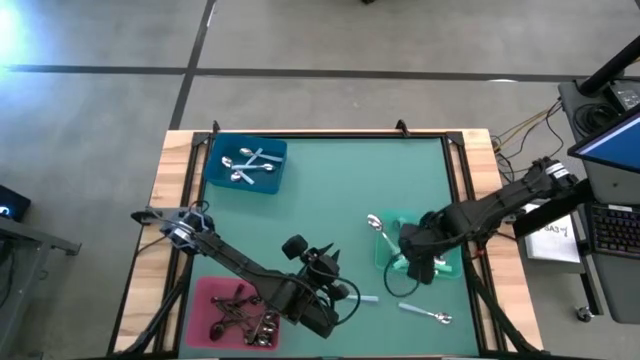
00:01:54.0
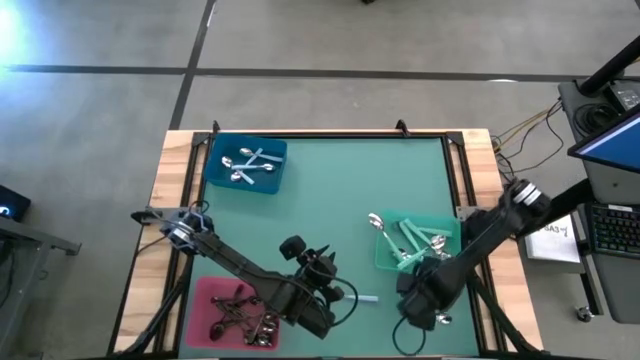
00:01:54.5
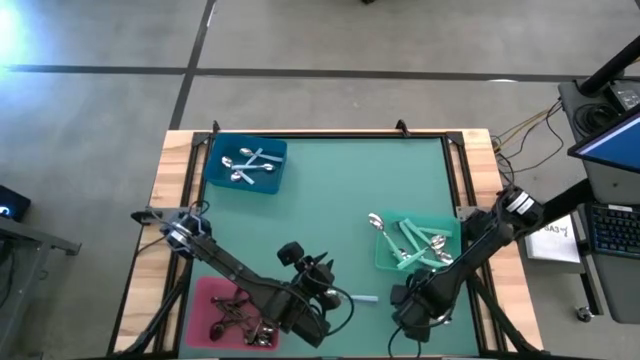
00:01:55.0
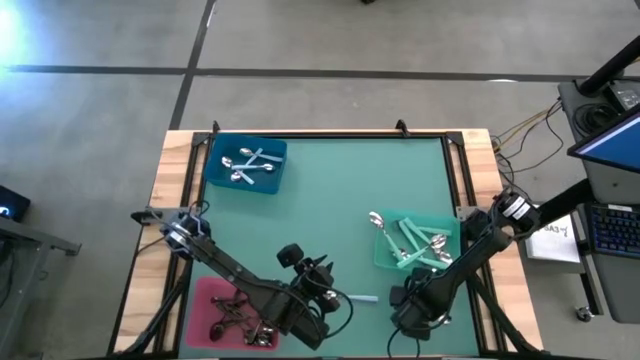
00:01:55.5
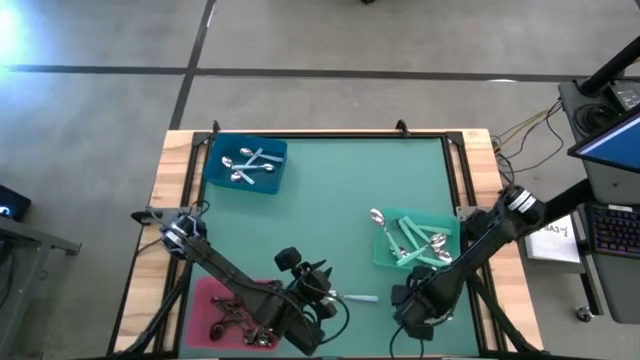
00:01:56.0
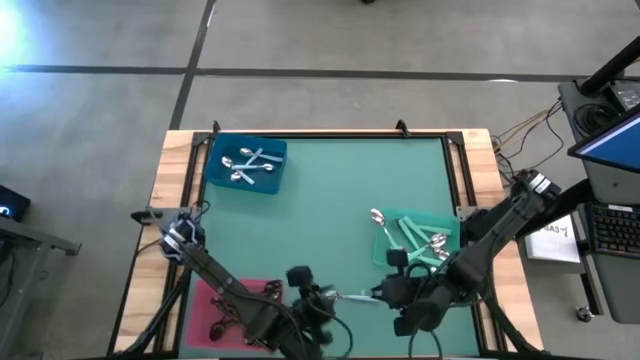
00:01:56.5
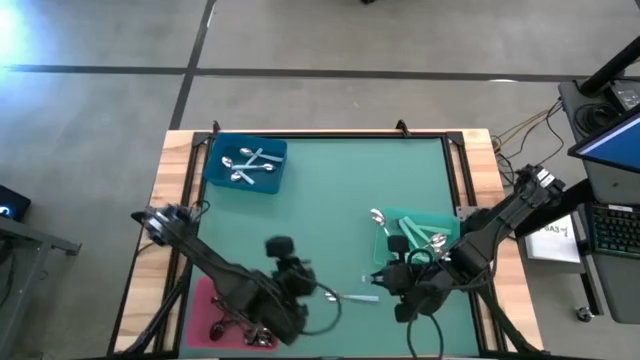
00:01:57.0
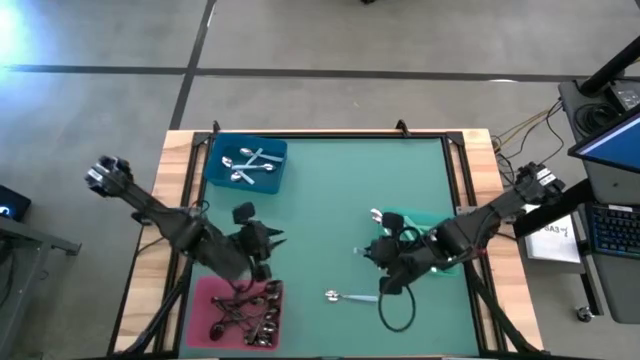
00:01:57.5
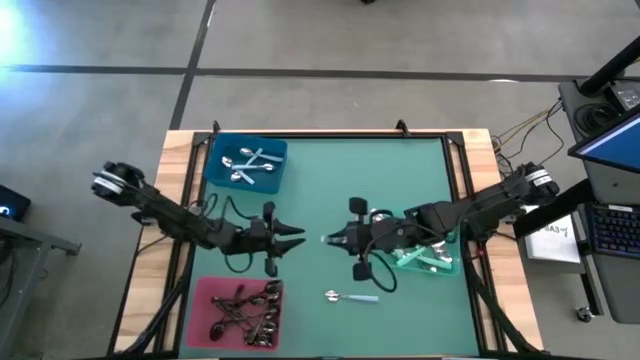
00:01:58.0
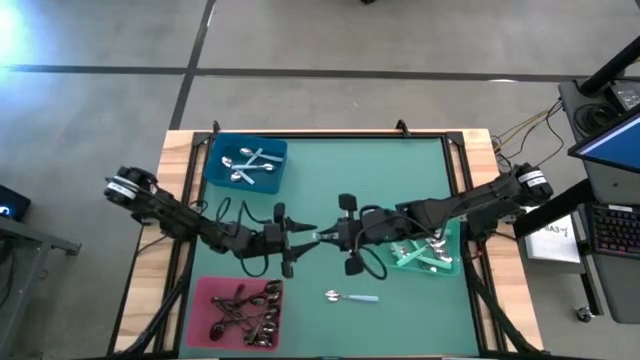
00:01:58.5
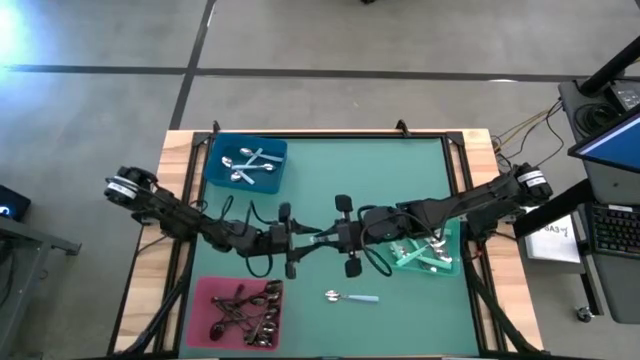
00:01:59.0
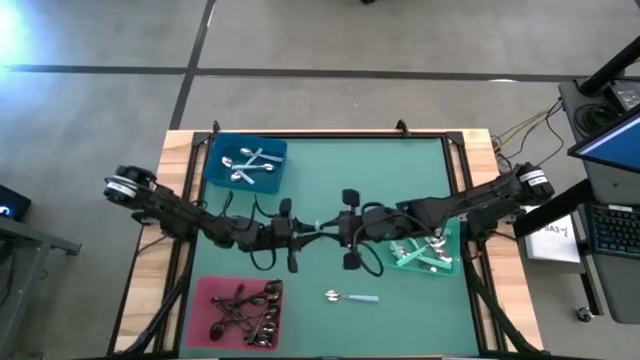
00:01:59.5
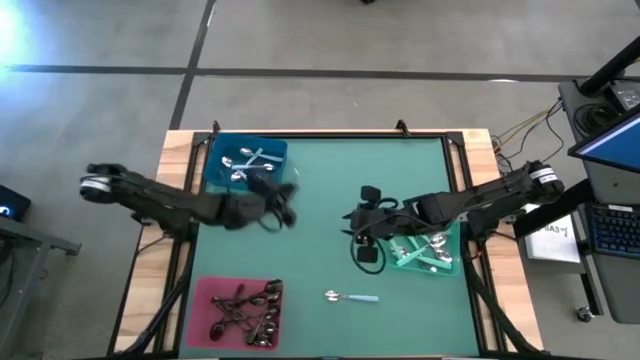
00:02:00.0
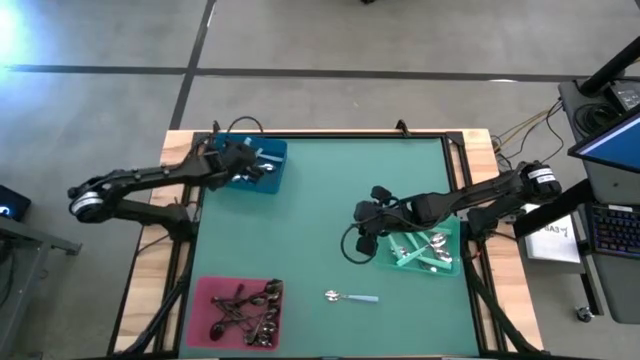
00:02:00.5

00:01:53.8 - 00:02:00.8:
Task: Sort silverware by color (type)
Put the right blue spoon into the blue bin

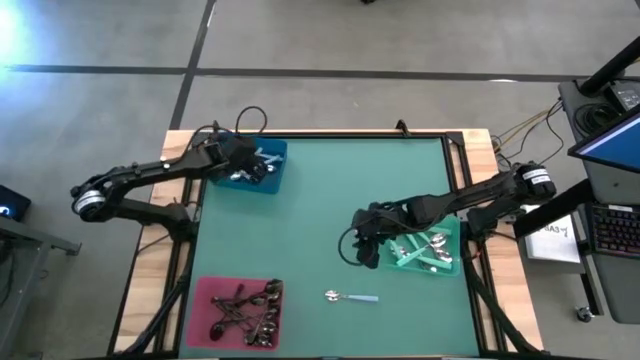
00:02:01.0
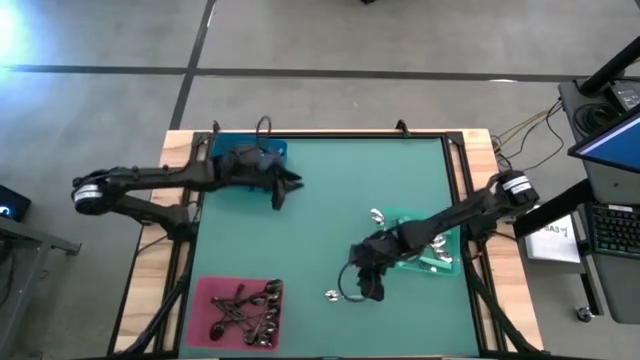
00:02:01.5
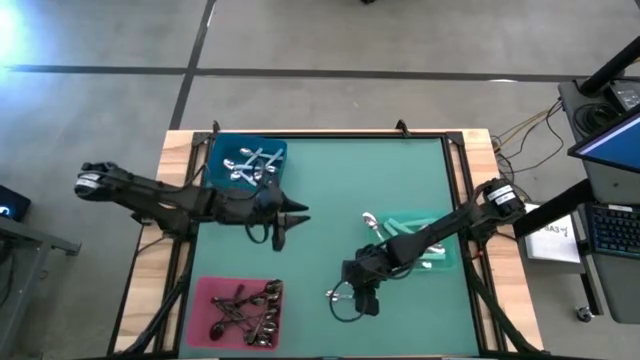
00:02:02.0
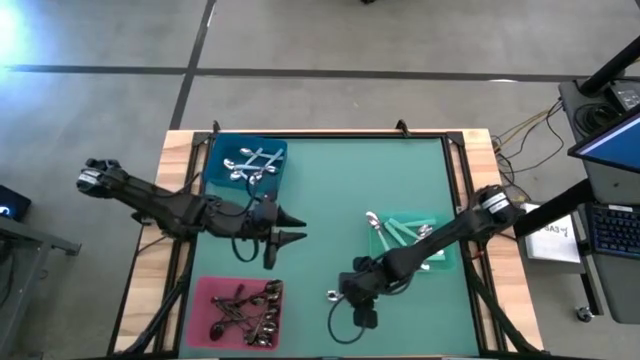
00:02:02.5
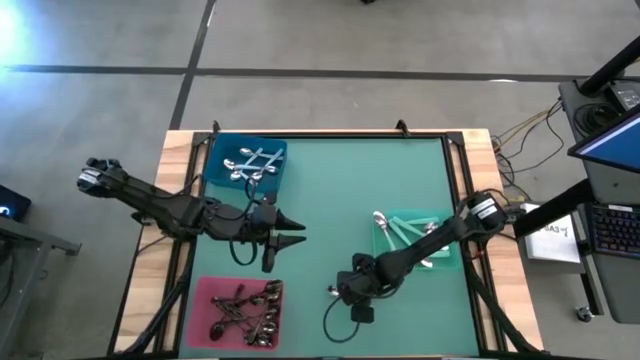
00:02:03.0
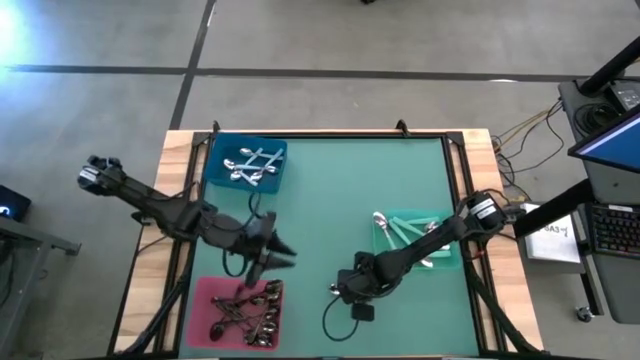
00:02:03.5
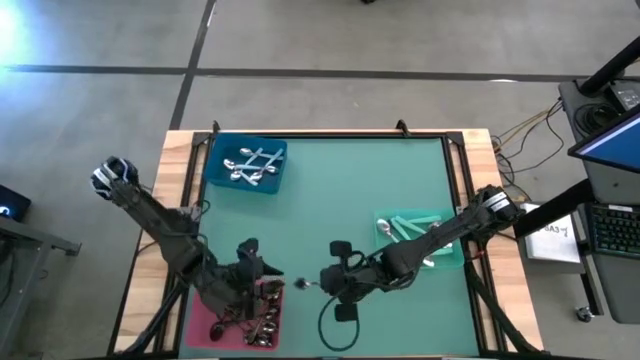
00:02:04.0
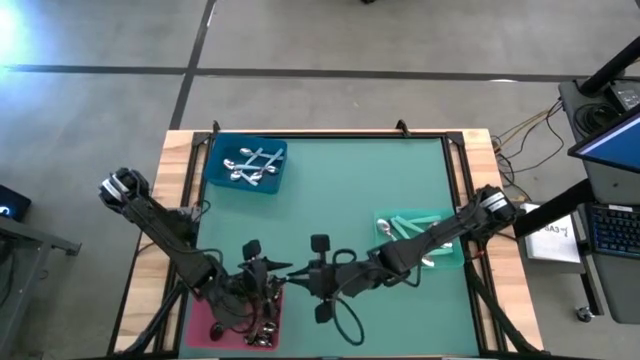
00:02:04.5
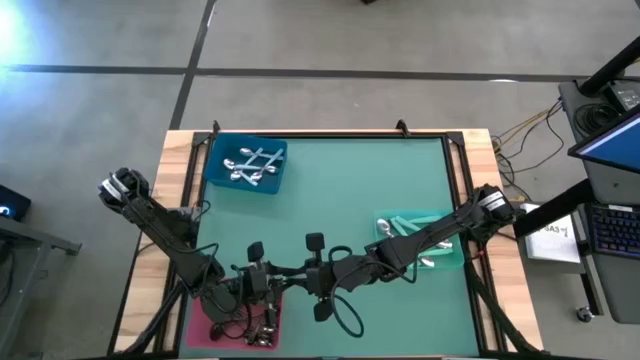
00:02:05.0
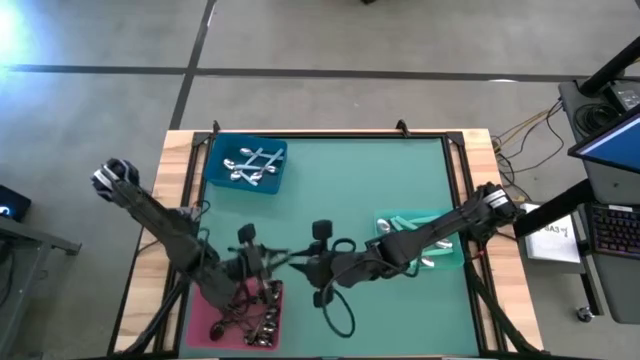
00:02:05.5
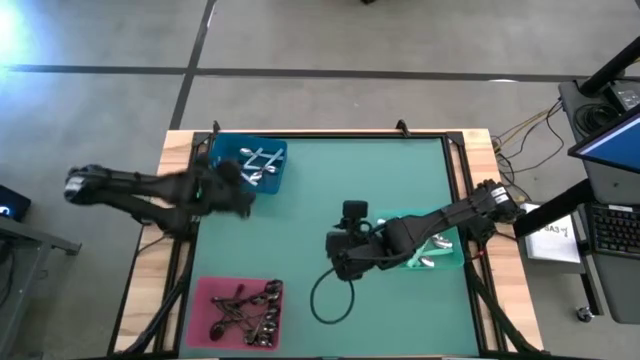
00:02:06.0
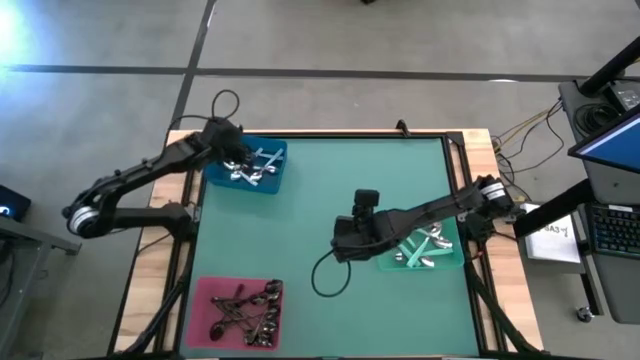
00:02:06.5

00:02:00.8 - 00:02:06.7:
Put the blue spoon into the blue bin

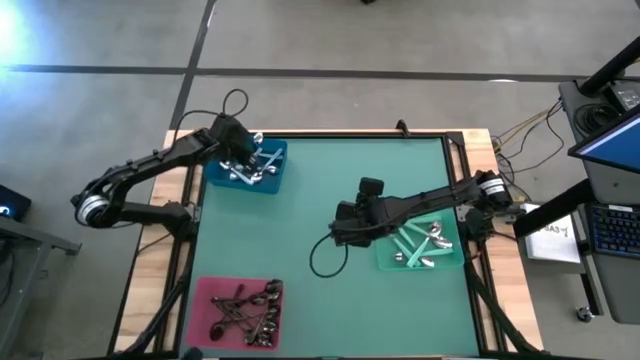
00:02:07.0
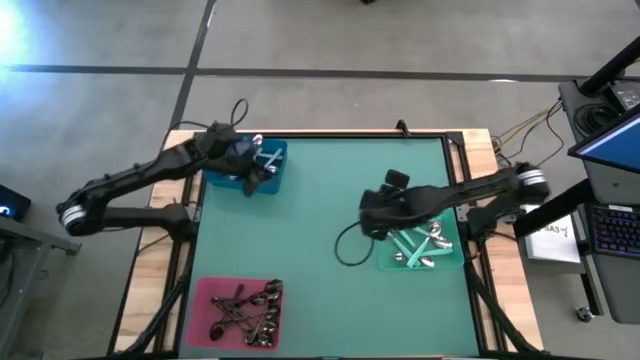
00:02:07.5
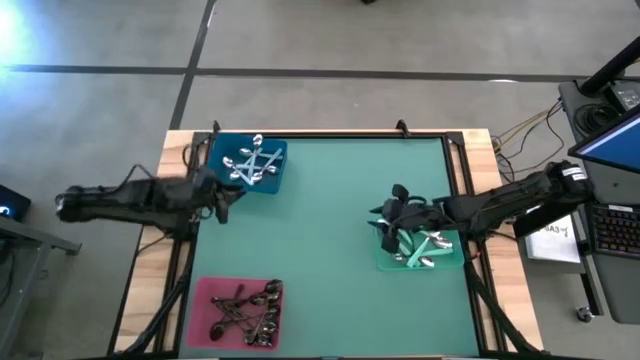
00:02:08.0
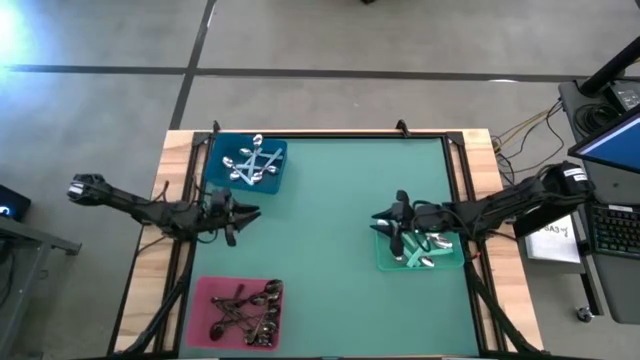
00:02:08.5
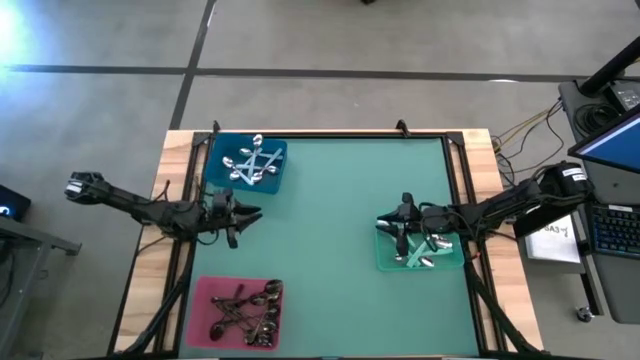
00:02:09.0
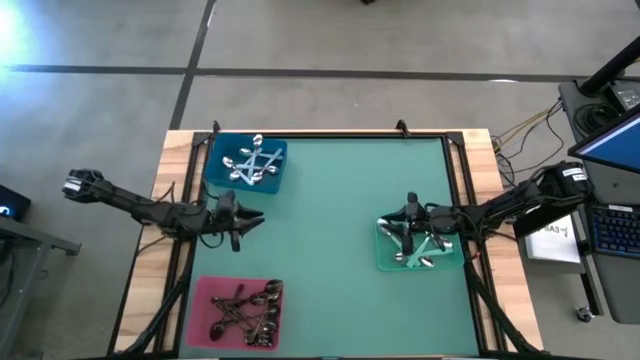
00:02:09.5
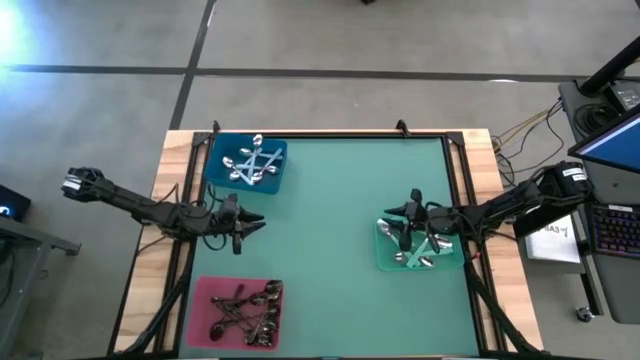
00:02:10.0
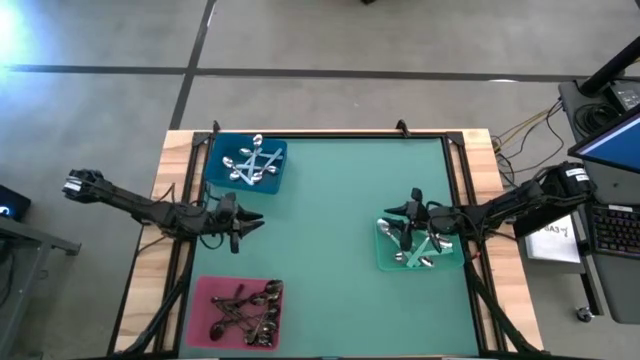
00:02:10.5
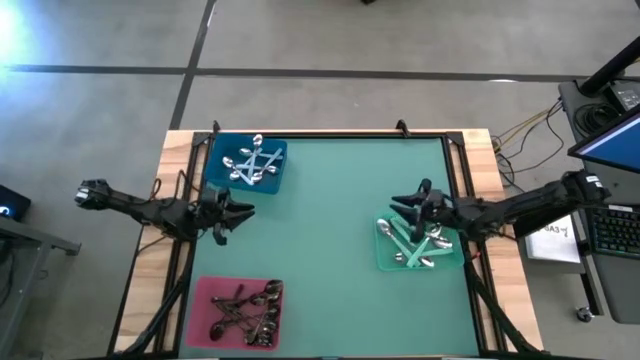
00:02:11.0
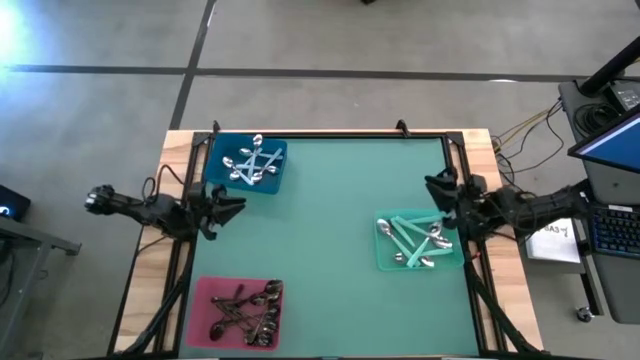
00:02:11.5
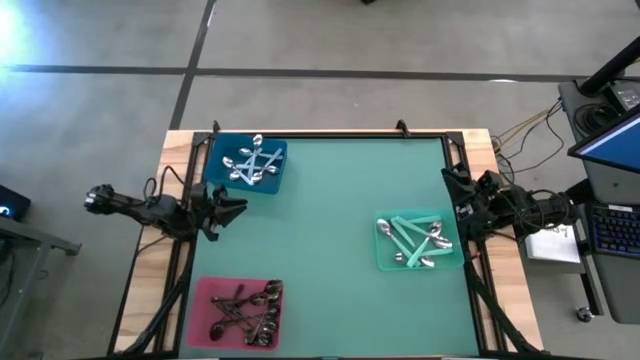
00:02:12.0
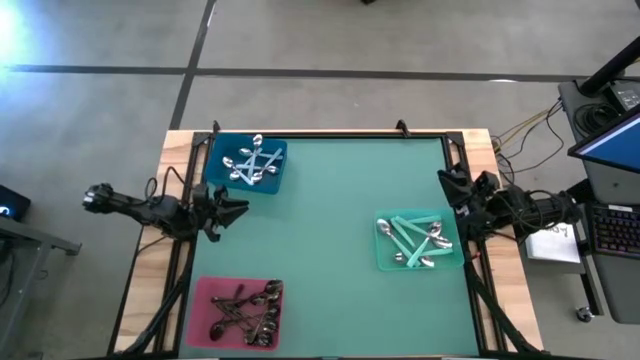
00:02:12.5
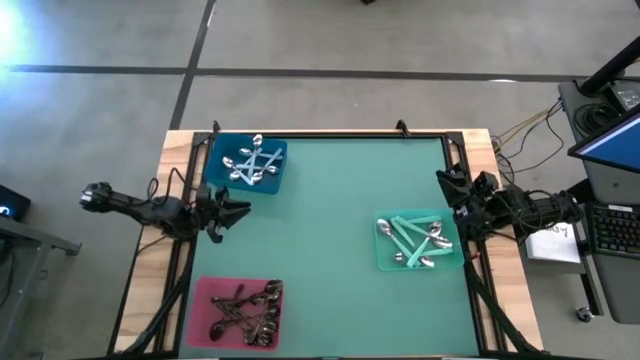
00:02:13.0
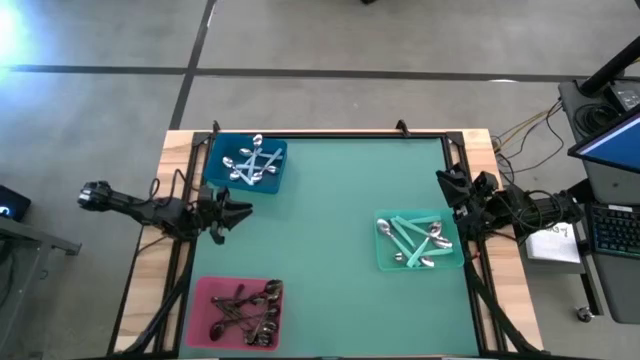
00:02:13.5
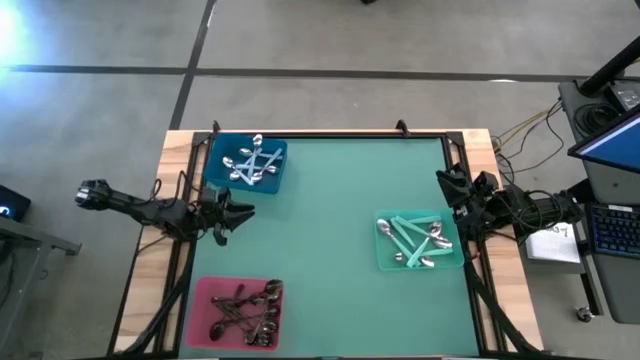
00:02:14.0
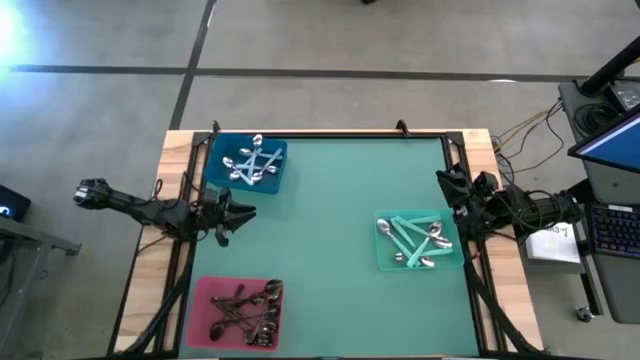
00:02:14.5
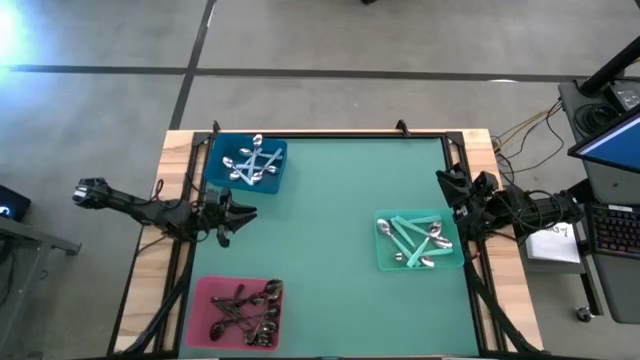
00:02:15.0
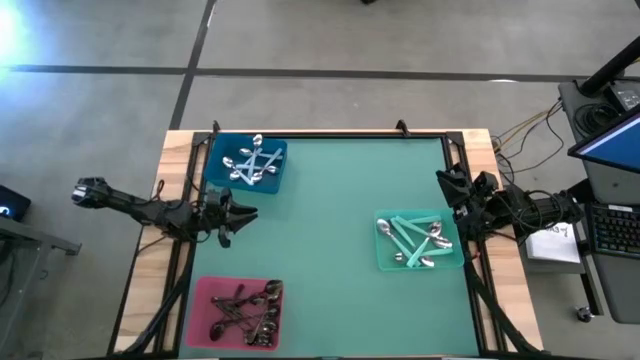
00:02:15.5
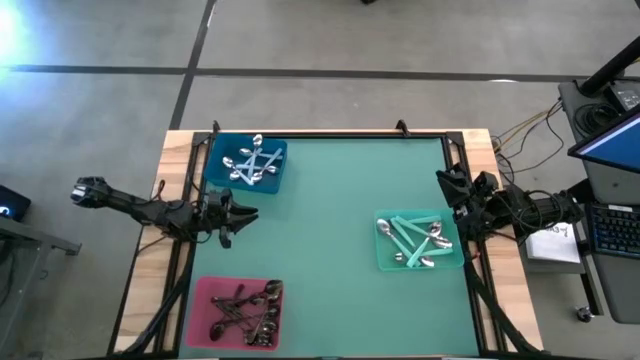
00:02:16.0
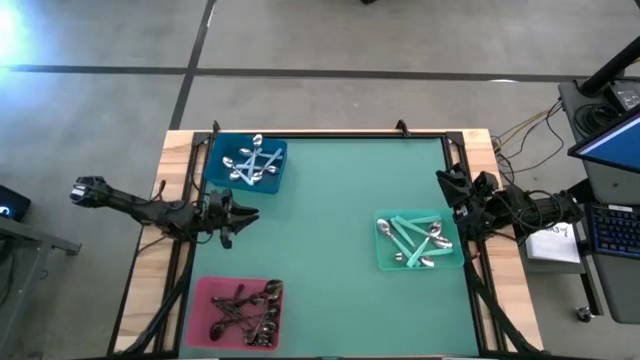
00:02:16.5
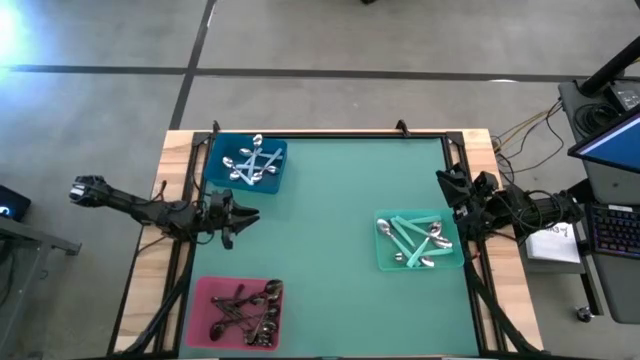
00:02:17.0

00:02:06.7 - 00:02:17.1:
Return to Home Position
